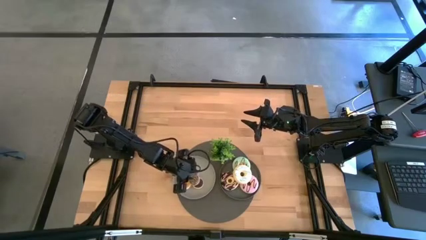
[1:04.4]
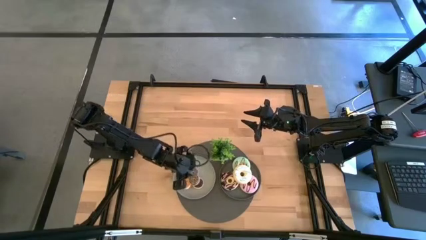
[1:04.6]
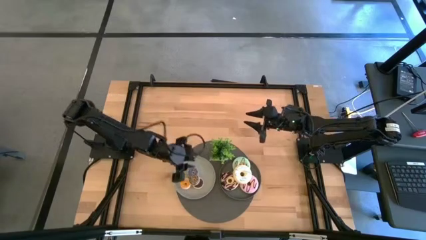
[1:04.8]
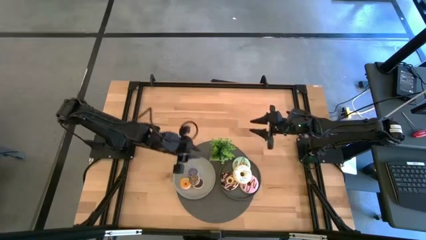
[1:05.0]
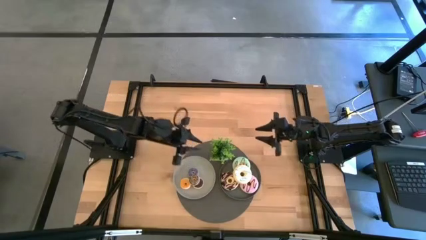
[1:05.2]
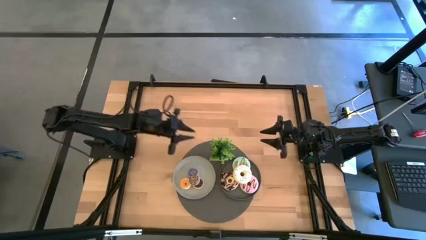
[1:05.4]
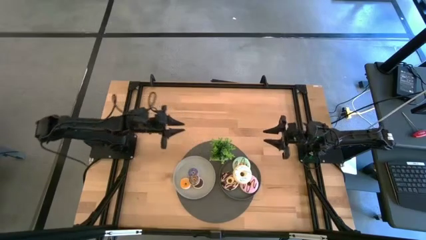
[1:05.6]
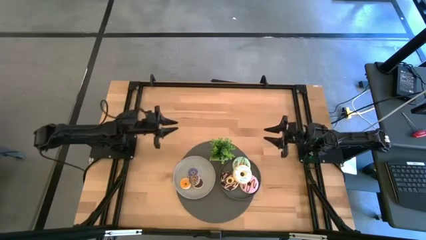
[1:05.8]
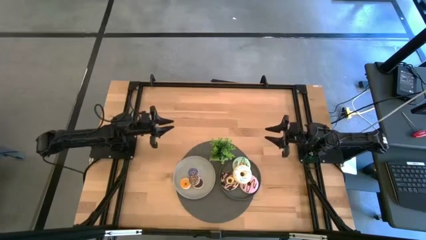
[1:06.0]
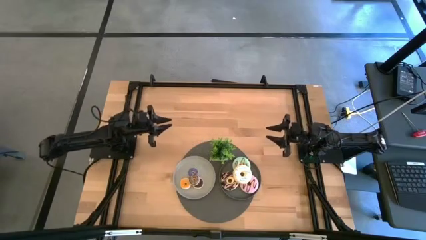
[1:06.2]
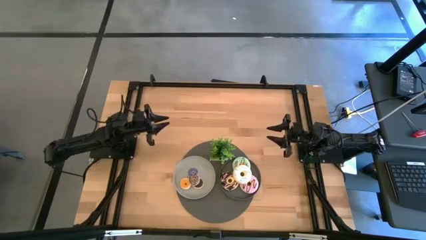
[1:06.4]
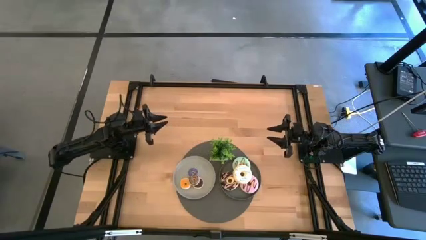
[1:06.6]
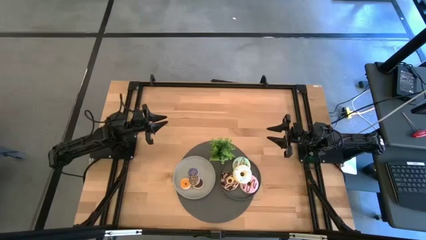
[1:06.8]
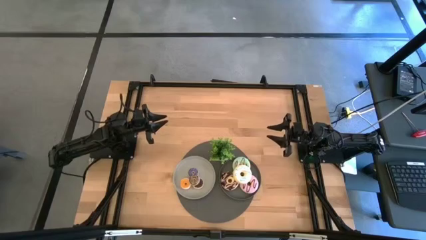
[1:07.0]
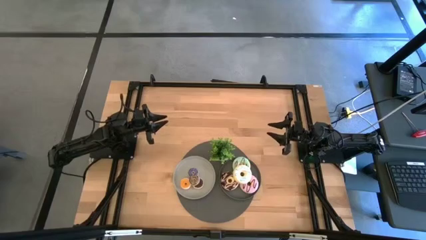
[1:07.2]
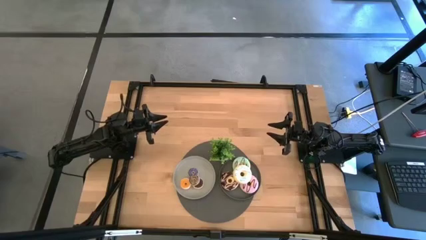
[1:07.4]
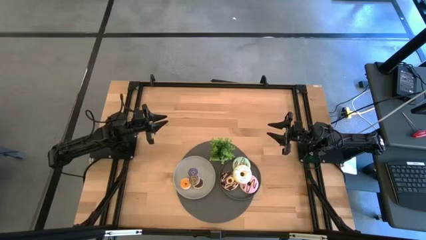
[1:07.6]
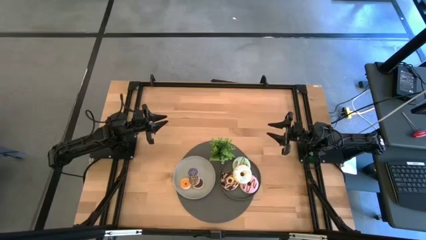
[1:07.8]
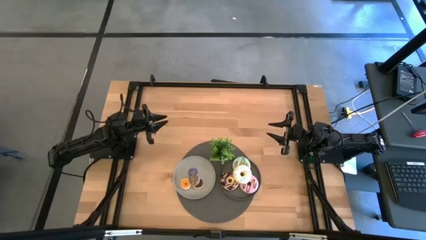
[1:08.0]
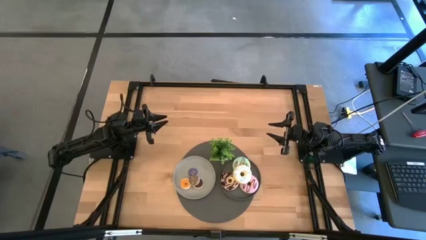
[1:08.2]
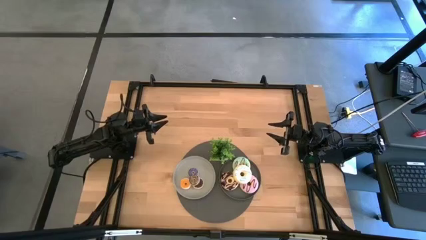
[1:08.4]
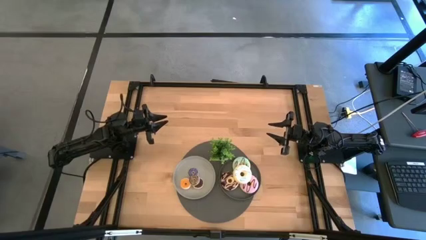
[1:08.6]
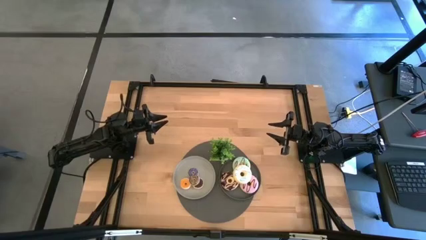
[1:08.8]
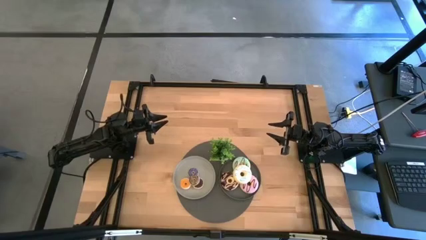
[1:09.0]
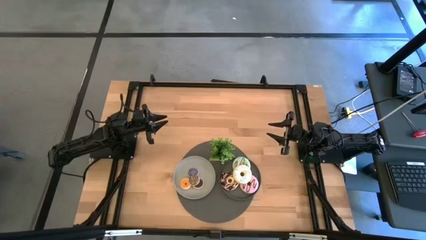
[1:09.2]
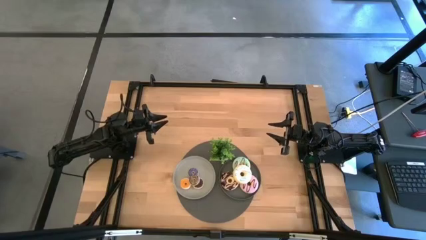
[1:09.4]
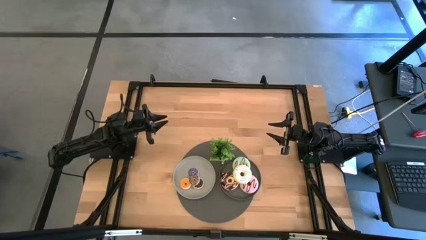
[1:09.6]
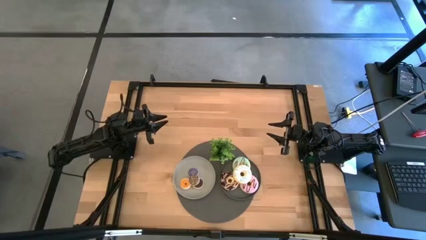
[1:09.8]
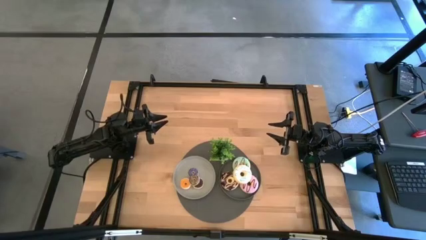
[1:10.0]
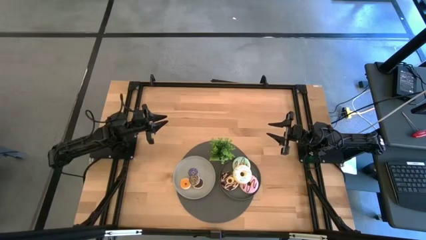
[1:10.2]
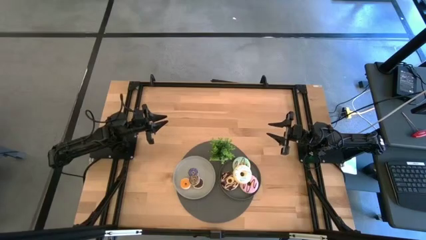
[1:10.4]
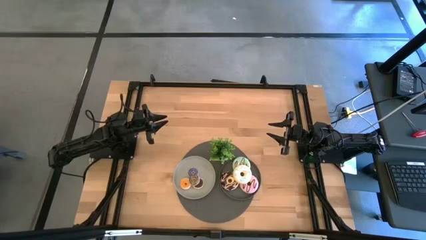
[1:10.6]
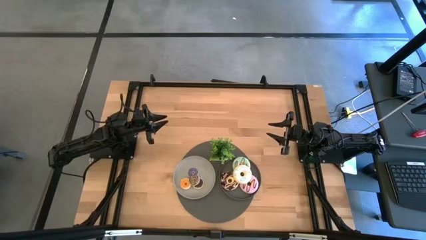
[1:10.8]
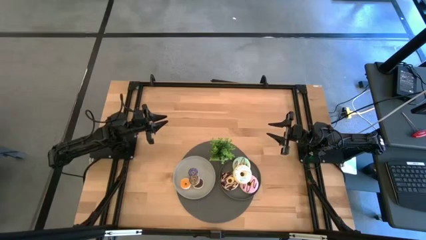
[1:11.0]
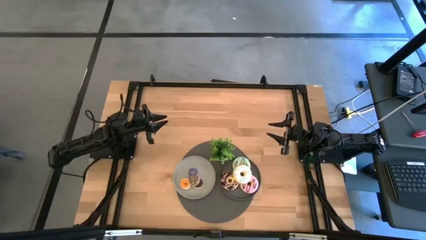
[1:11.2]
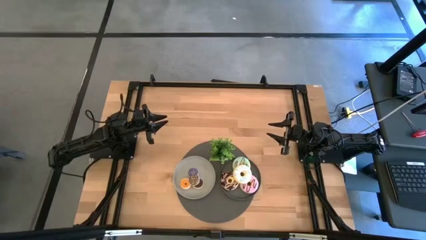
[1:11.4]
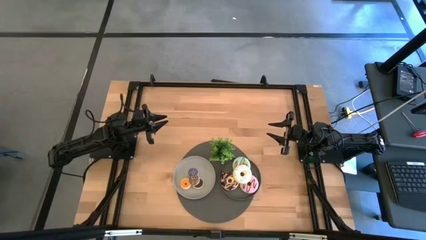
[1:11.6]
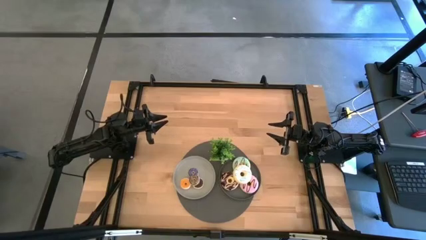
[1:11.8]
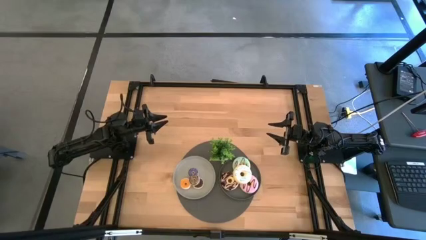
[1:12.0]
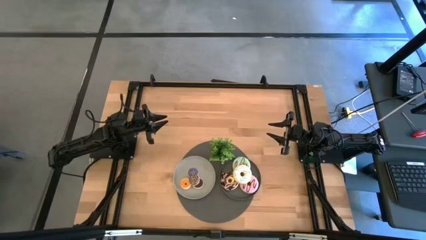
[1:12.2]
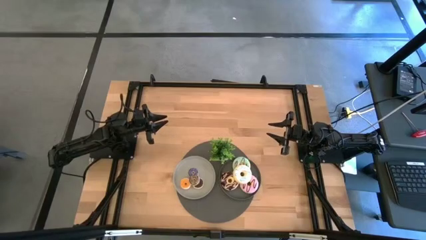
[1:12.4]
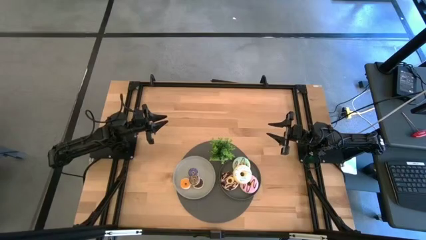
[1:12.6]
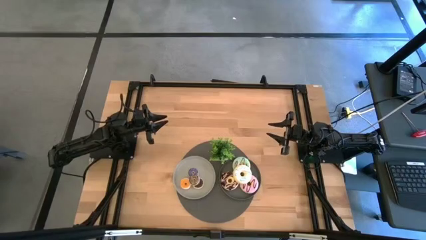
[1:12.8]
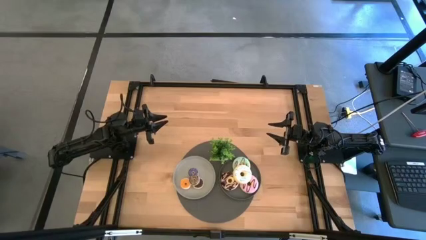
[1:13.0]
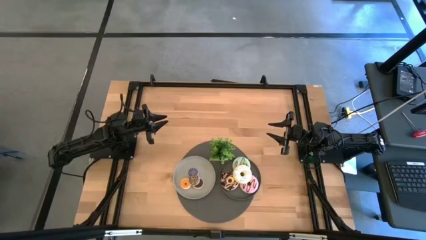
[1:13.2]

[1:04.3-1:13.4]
Task: Pick & Place donuts
Return to Home Position

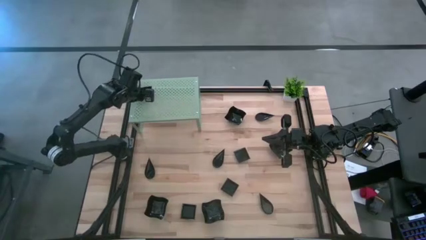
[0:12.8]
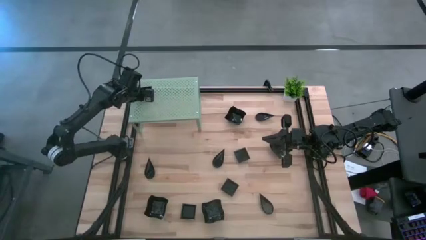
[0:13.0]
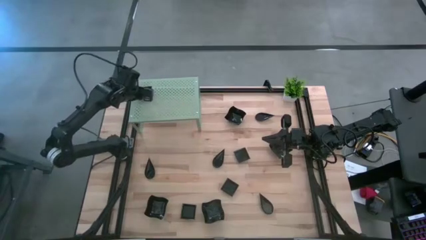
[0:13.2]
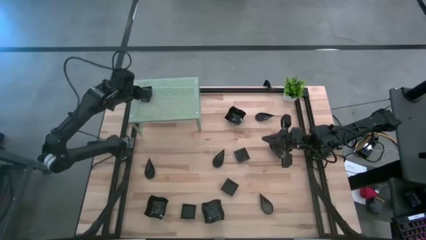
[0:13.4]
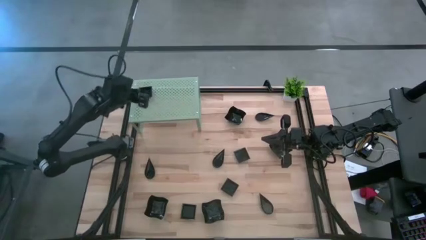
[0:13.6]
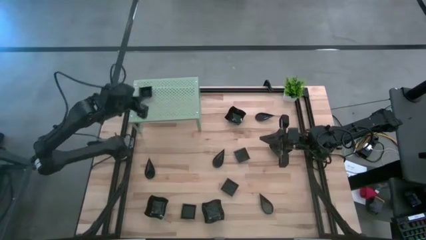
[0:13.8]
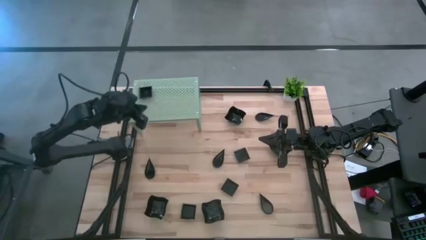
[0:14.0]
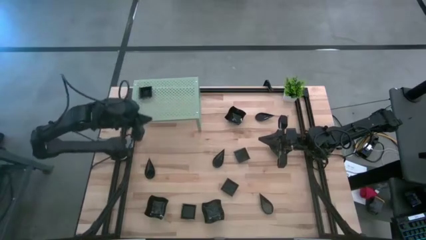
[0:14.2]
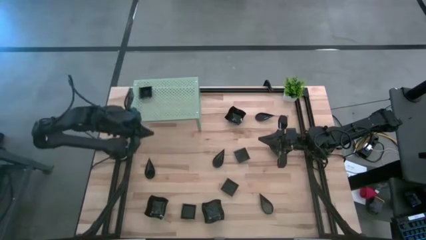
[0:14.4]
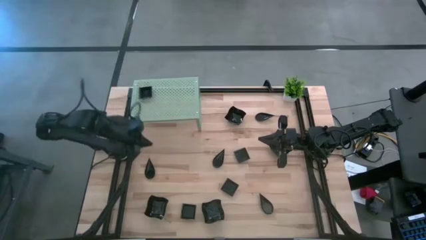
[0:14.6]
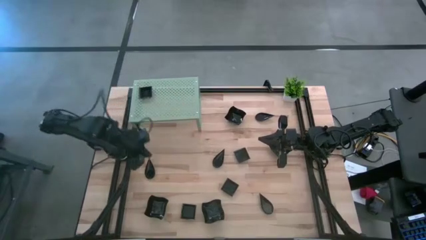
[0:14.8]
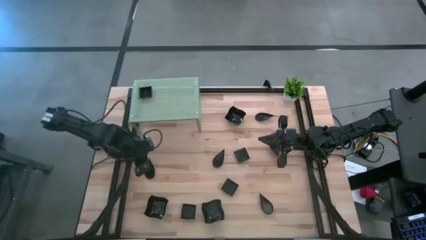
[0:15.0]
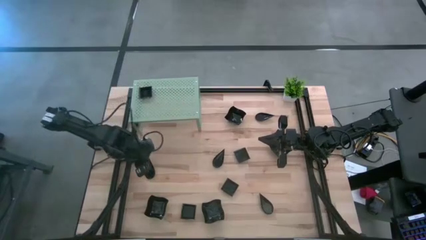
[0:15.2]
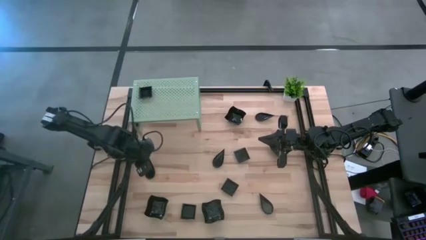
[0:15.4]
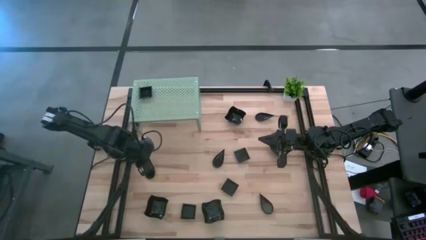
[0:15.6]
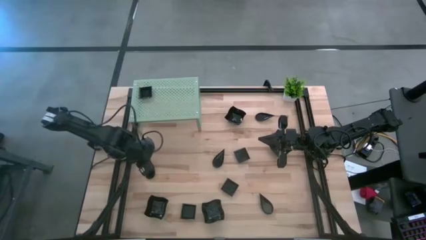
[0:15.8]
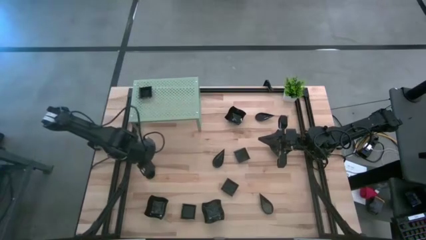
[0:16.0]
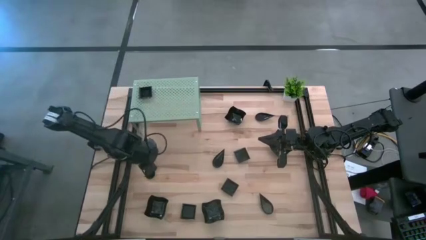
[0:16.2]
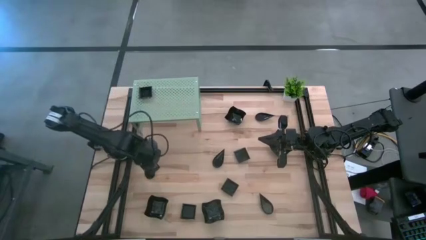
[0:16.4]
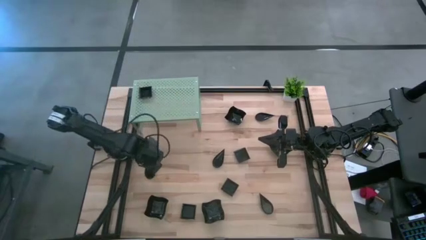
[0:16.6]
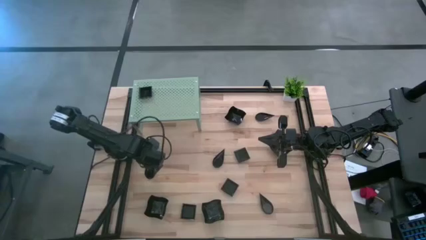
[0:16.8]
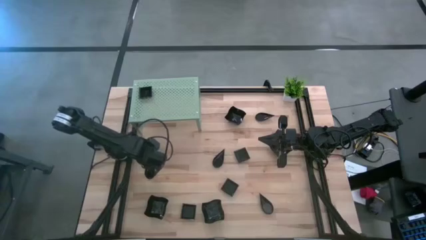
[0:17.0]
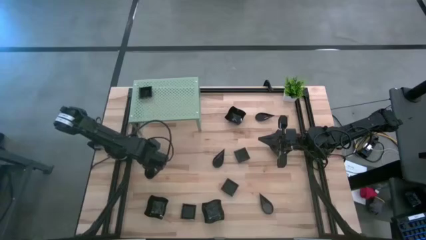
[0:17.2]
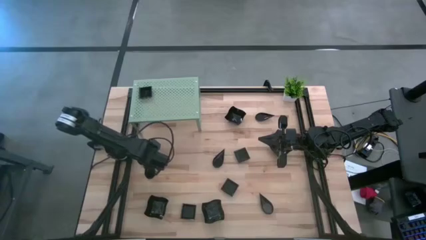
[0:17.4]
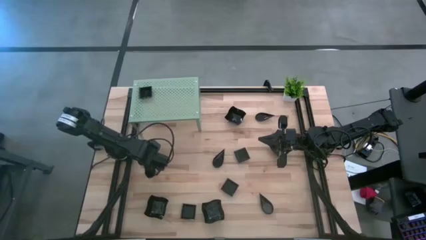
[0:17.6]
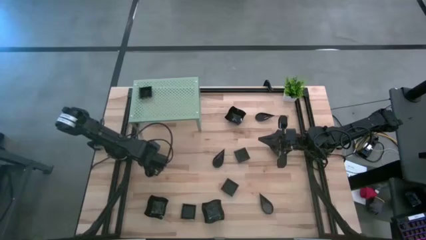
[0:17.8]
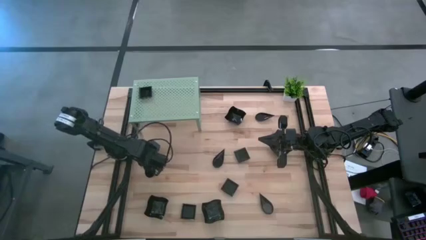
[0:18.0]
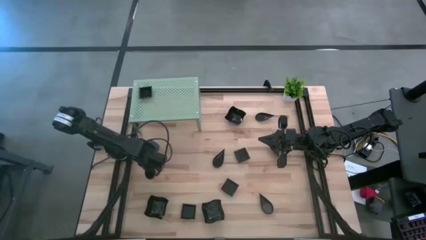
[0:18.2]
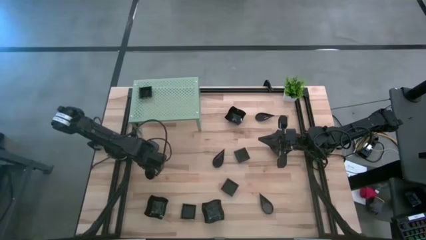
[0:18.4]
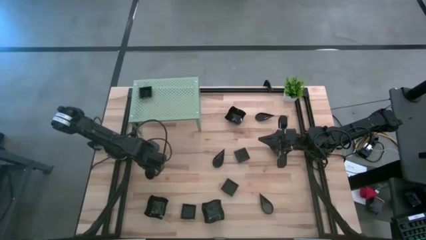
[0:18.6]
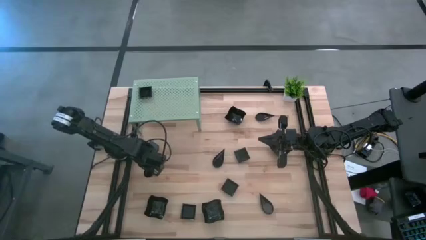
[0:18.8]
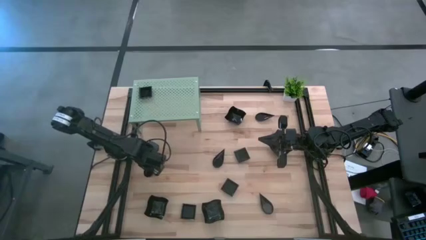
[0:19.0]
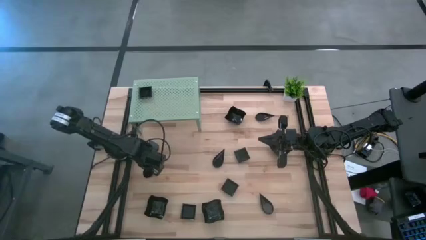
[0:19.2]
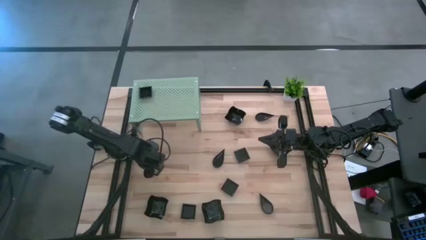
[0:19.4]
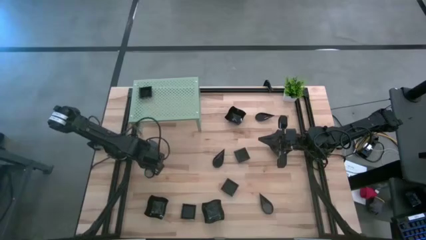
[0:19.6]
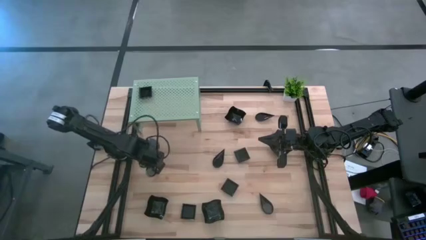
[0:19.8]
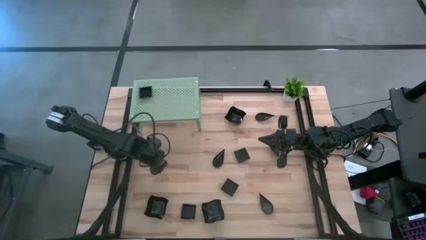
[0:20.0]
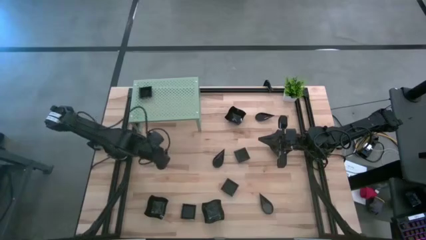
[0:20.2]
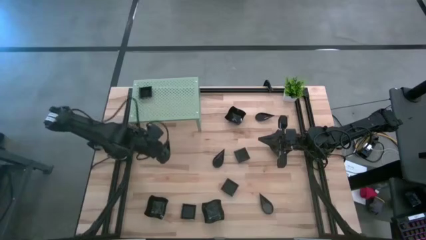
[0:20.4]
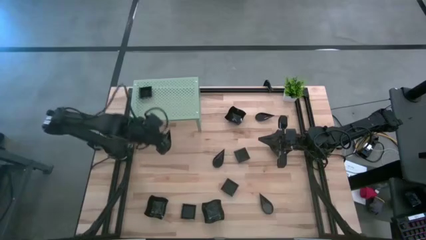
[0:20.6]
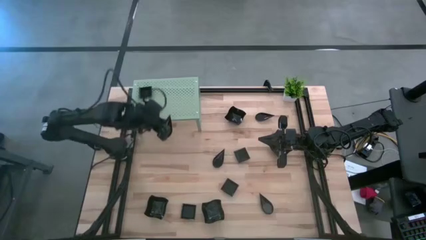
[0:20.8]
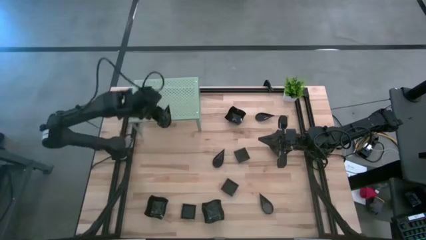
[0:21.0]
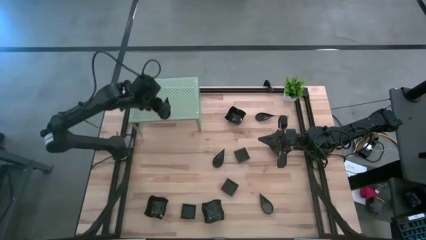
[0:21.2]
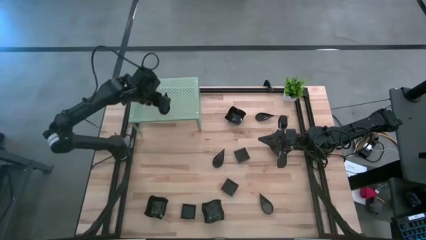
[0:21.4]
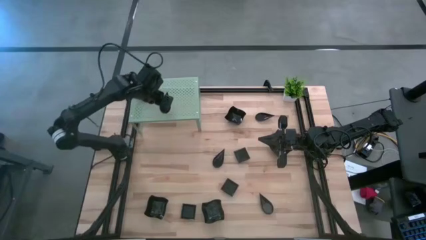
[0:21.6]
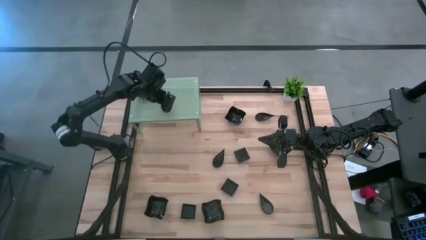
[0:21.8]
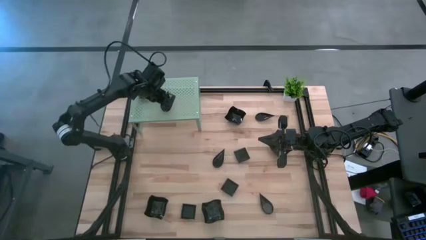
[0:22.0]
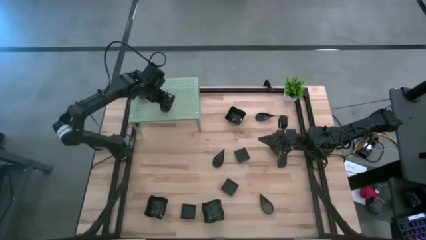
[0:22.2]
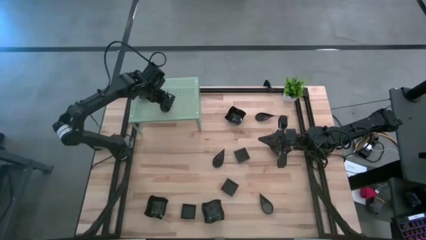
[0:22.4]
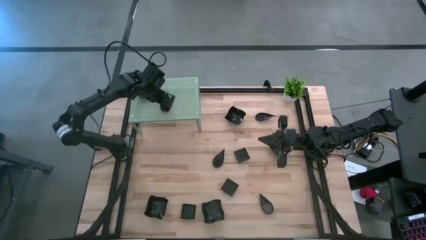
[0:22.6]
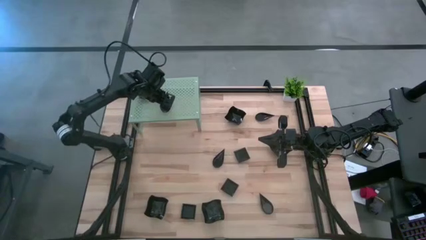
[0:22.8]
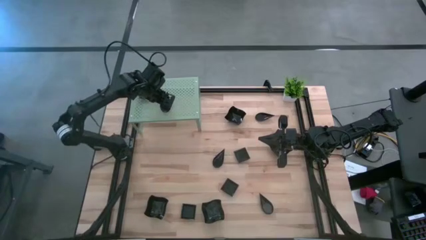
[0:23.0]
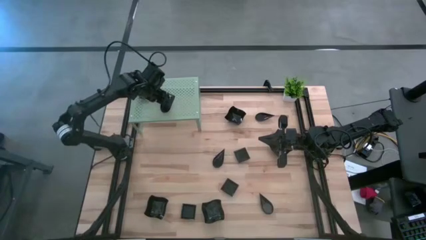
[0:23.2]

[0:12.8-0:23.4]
Task: Pick & Place Mini shaped plates
Put the black drop-shaped plate on the shelf
